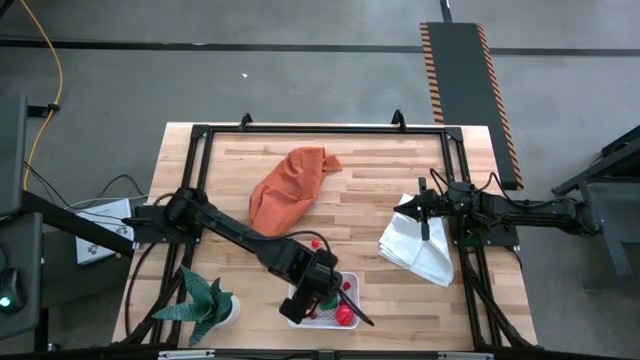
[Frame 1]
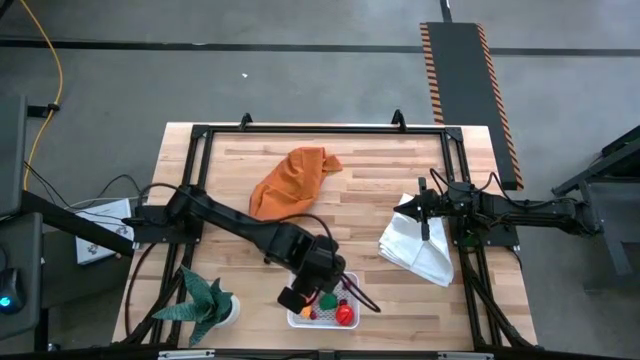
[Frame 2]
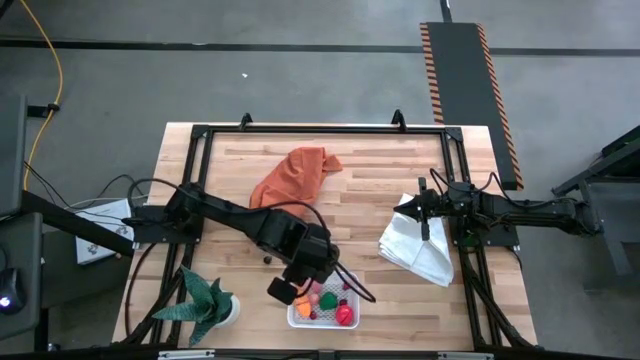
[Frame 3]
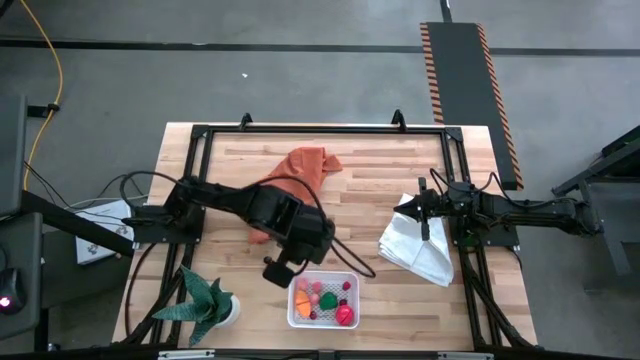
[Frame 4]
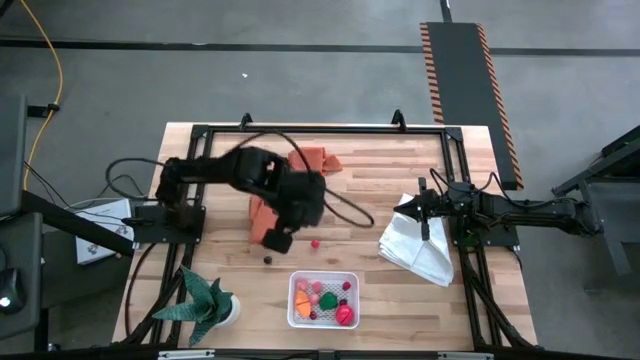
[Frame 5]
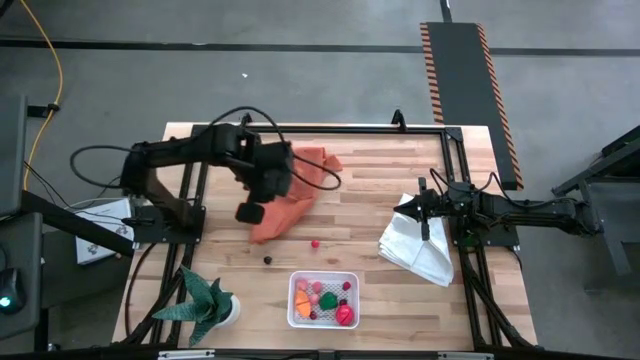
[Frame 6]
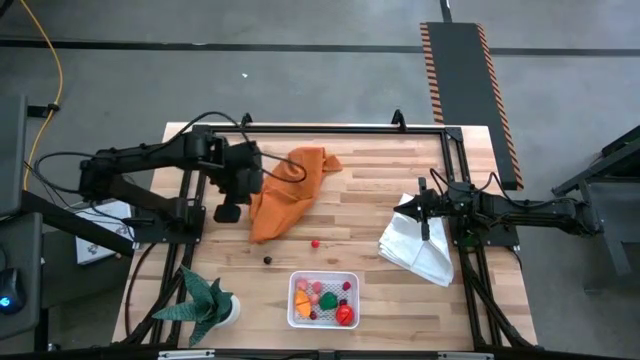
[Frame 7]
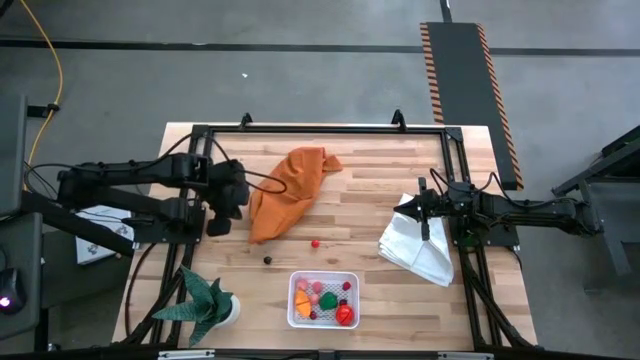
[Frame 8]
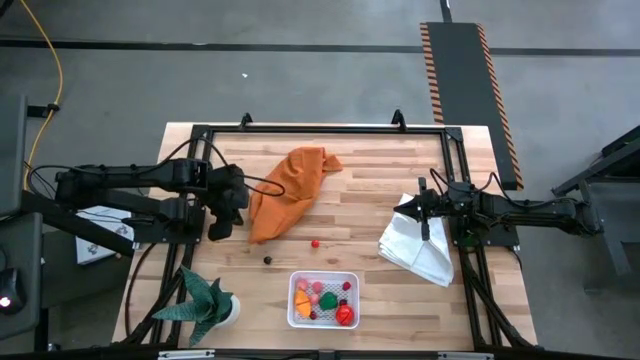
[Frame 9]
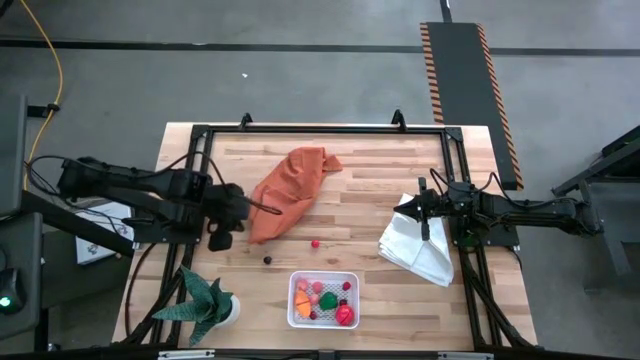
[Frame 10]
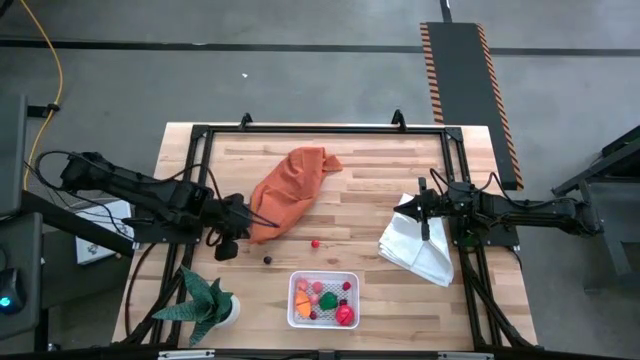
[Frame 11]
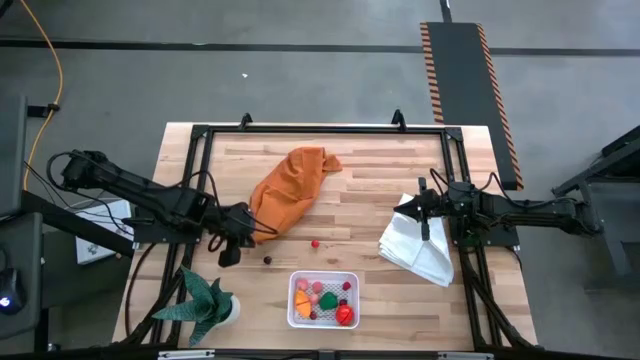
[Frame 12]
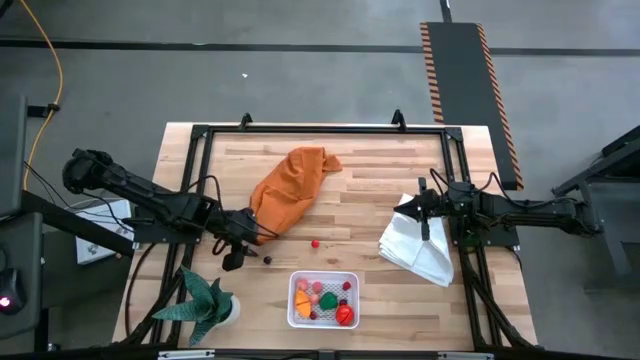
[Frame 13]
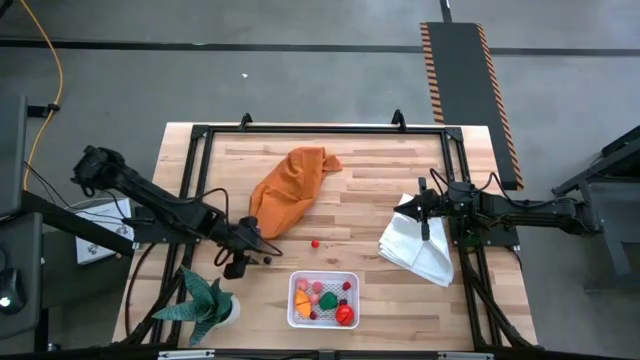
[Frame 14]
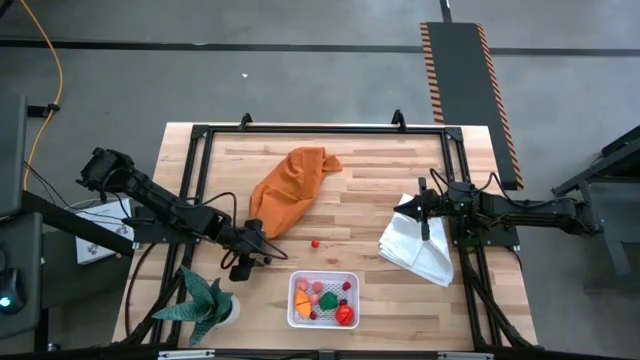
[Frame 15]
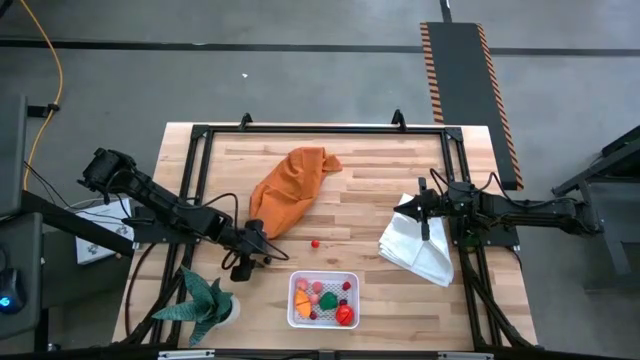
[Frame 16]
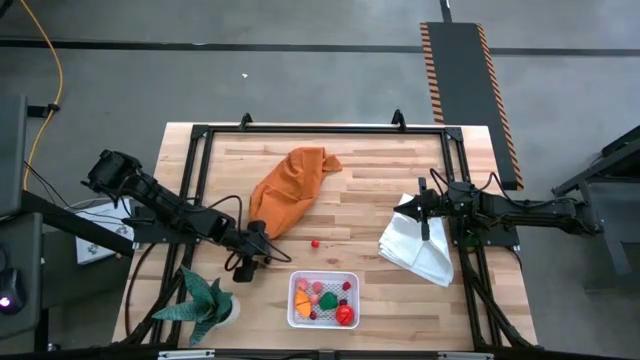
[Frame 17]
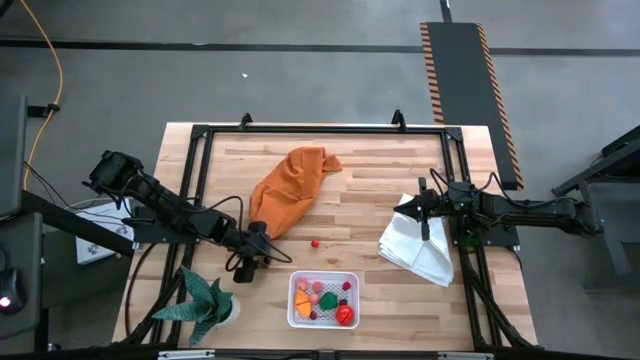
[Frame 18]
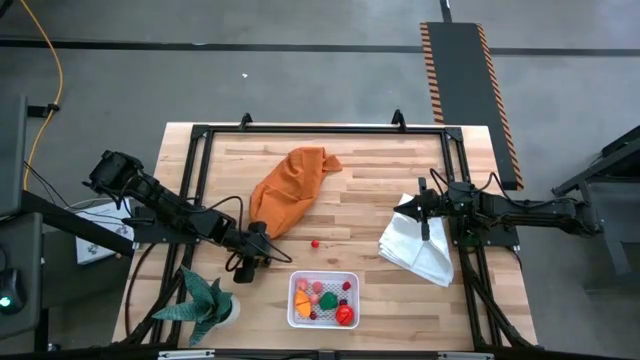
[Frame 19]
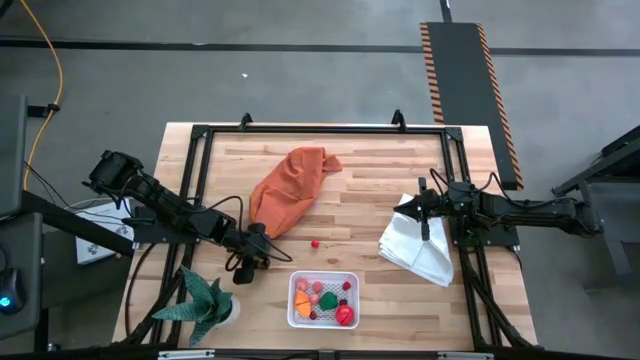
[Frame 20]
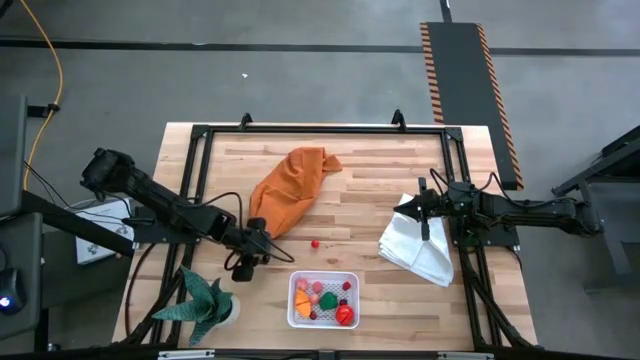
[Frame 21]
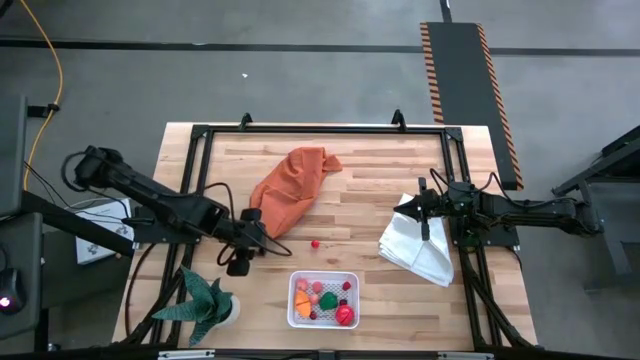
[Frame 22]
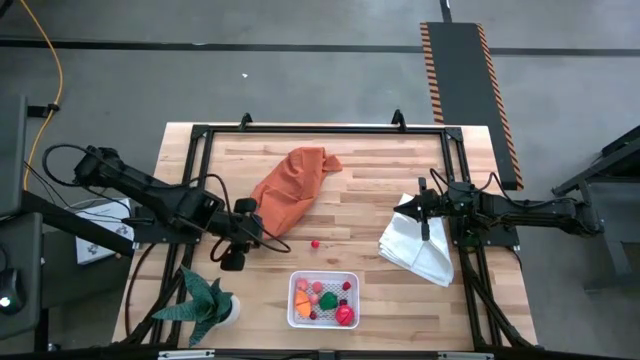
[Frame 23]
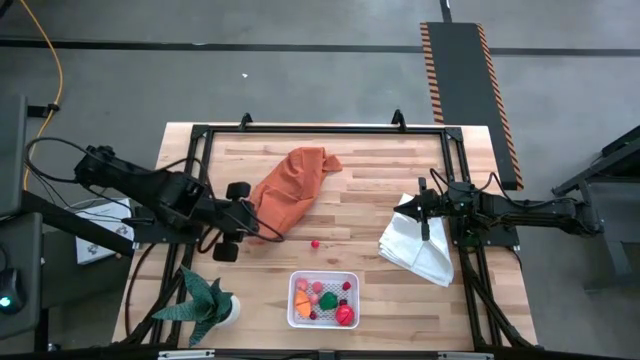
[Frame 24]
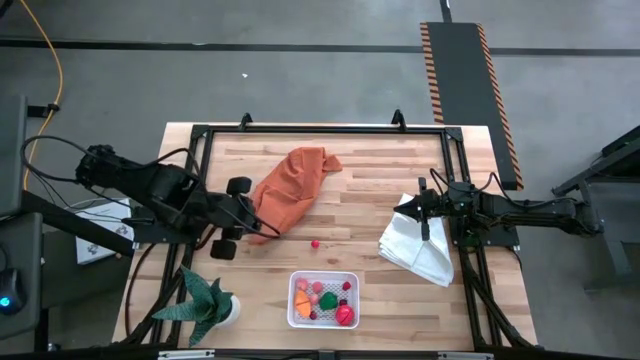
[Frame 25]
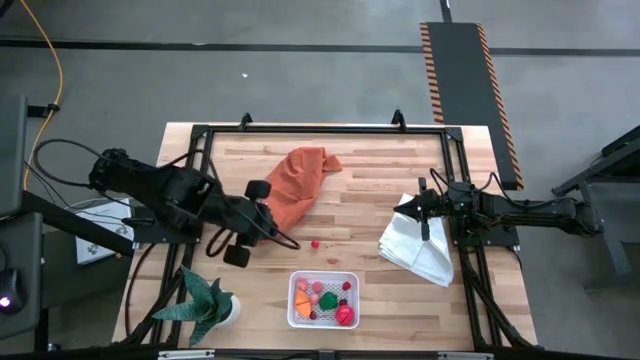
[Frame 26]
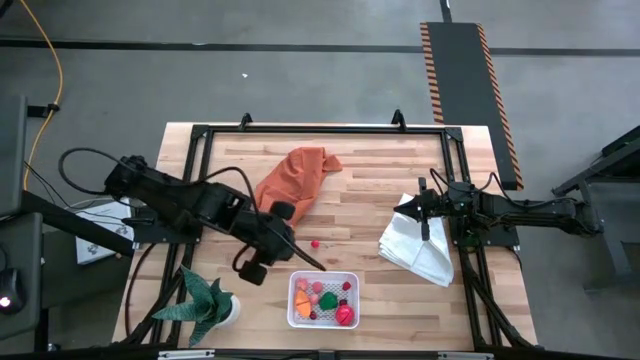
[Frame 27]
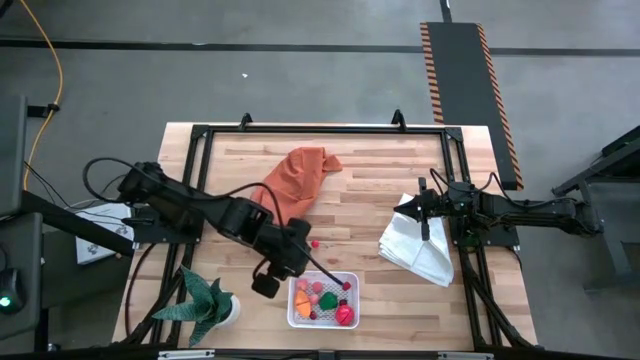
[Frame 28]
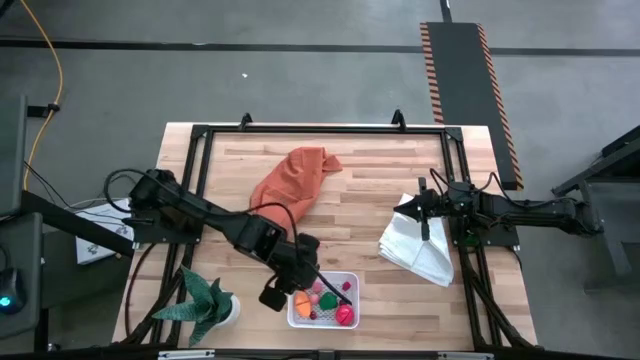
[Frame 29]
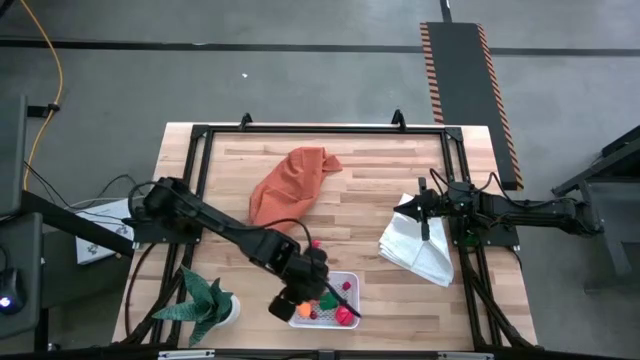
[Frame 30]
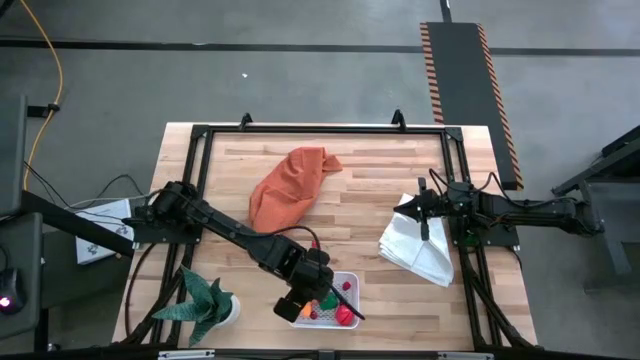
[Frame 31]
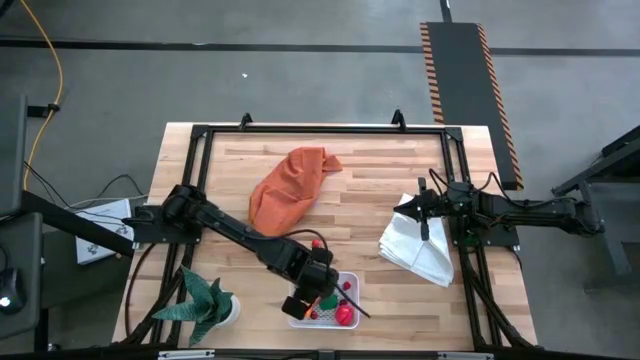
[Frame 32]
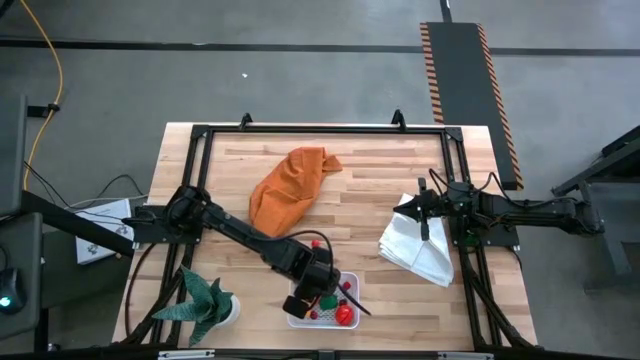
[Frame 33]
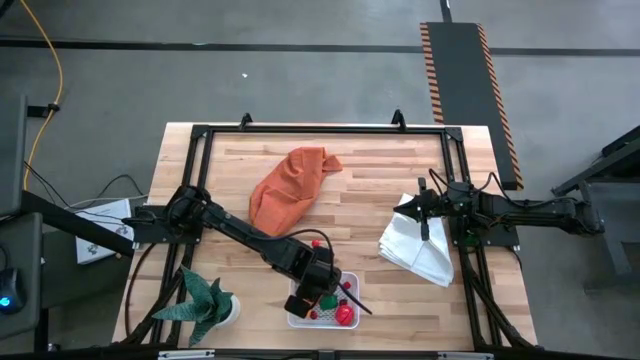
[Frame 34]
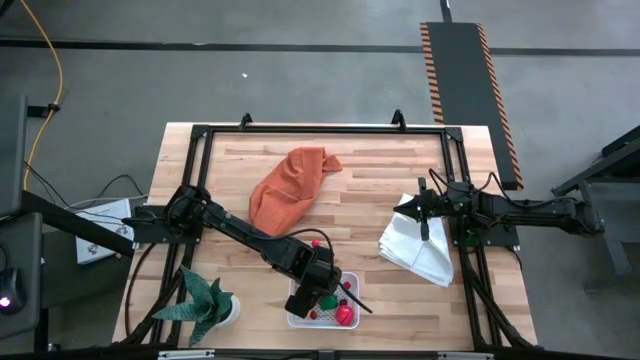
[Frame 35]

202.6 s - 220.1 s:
Task: Pick and placing Produce into tupperware
Put the black cherry into the white bin

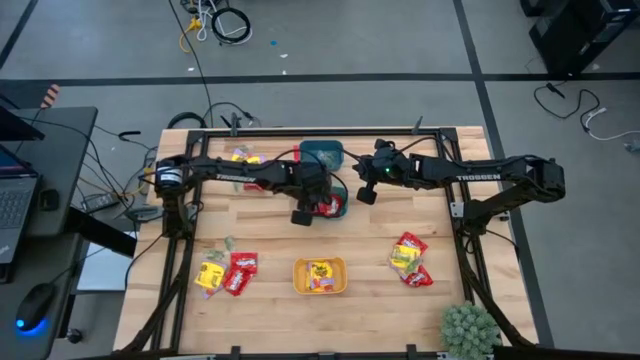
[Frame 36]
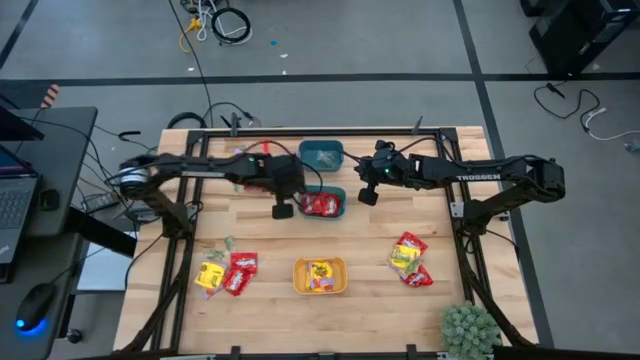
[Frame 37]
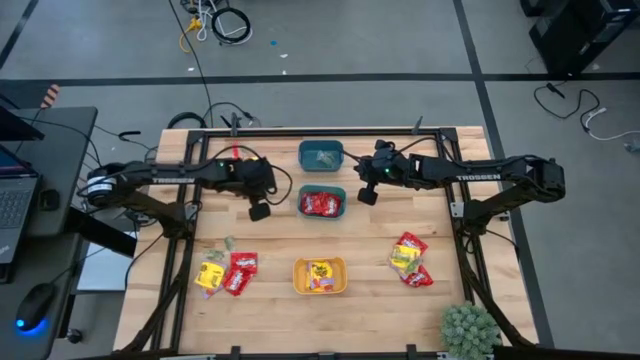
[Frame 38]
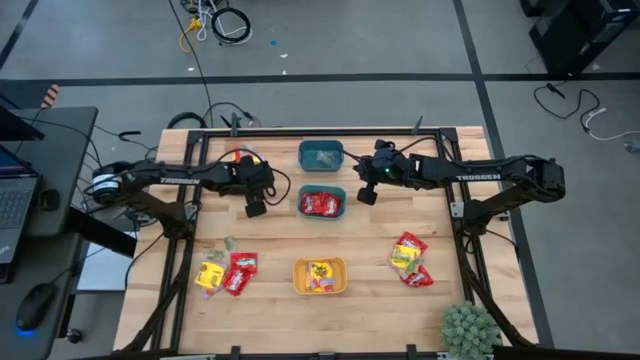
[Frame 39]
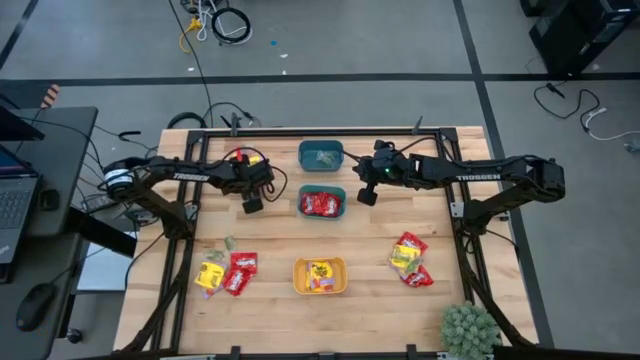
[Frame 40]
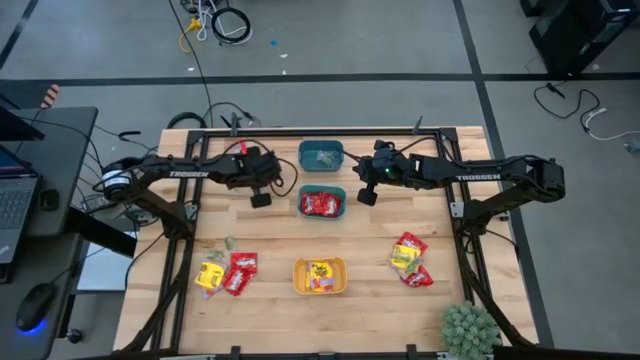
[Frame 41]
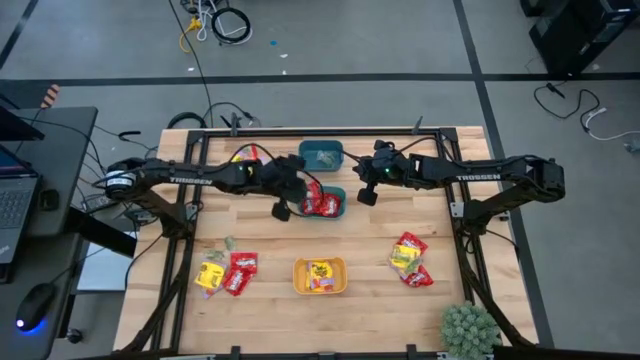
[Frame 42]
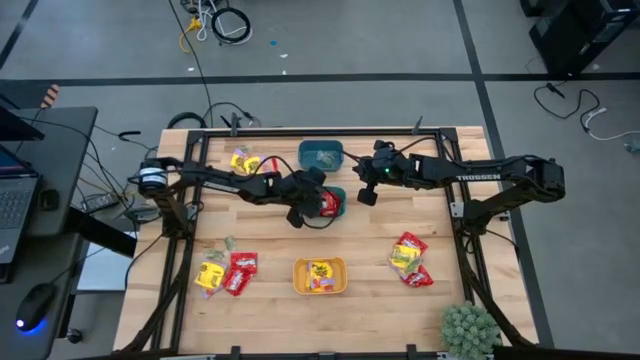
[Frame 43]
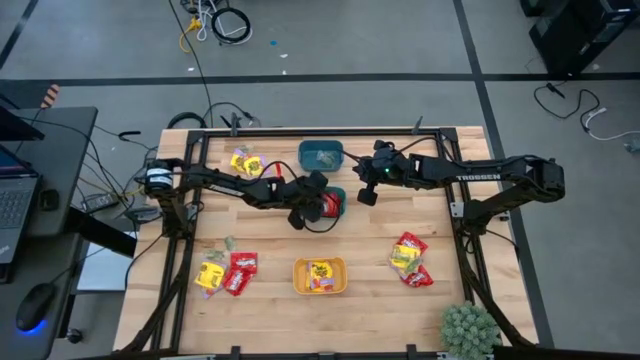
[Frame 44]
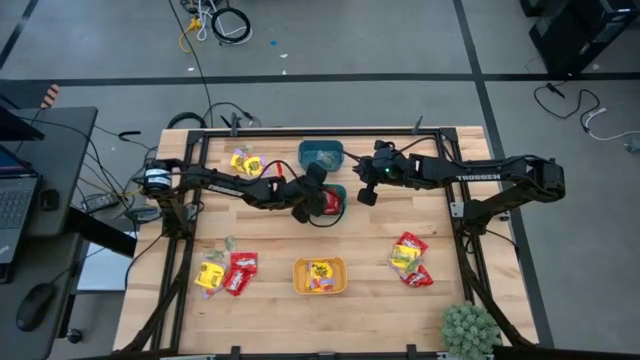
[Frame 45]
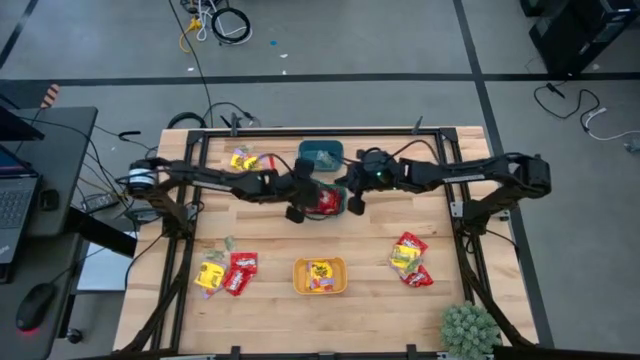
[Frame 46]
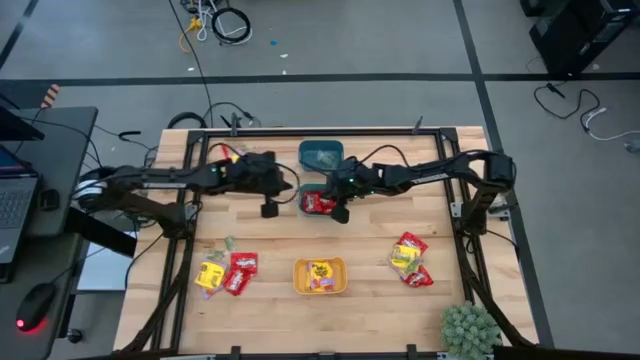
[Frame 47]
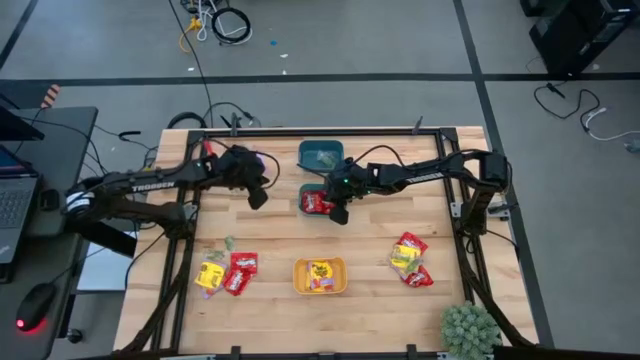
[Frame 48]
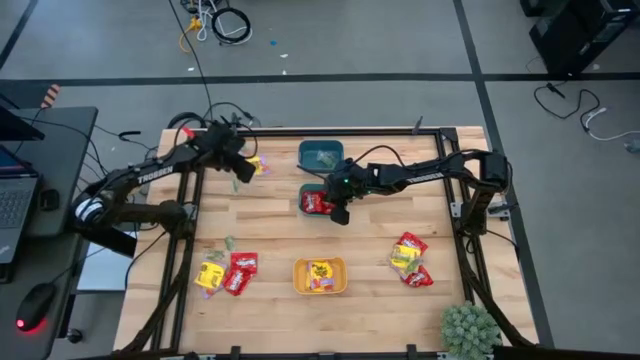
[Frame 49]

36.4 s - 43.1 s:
Task: Sort candy
Put the red candy into the green bin
